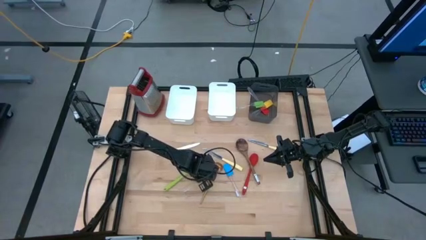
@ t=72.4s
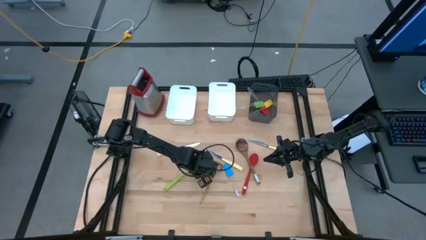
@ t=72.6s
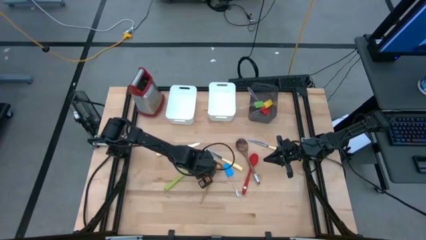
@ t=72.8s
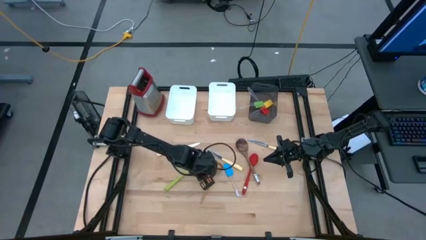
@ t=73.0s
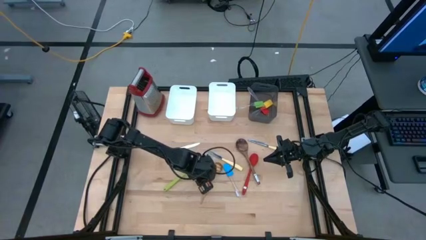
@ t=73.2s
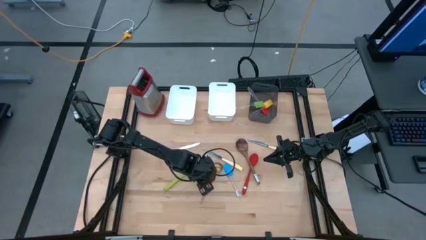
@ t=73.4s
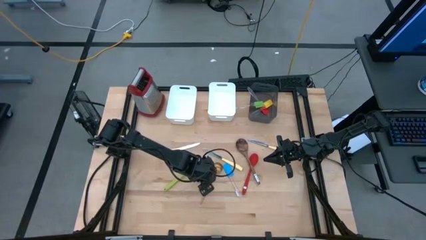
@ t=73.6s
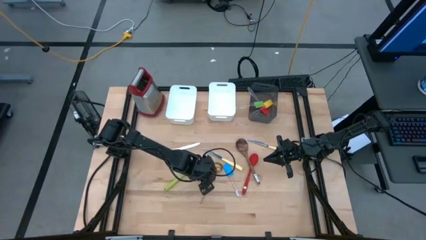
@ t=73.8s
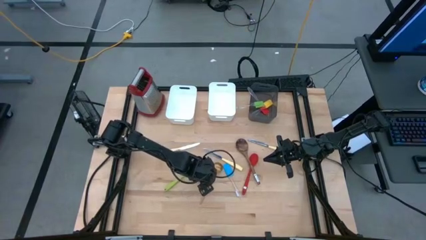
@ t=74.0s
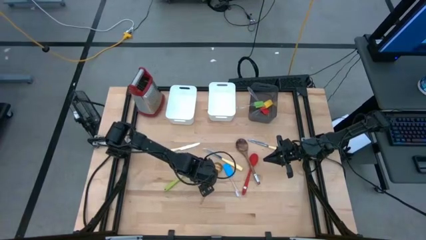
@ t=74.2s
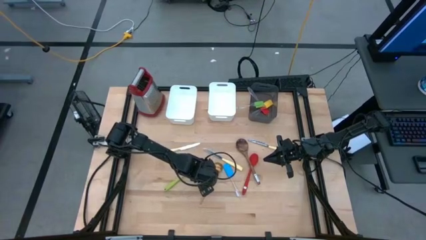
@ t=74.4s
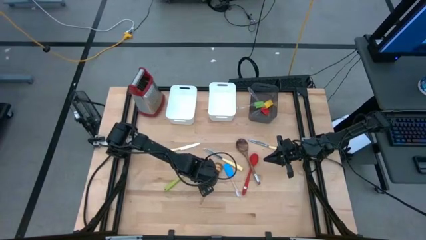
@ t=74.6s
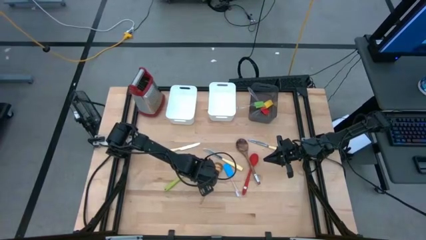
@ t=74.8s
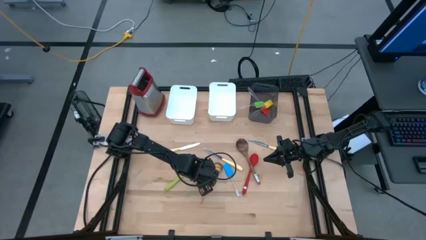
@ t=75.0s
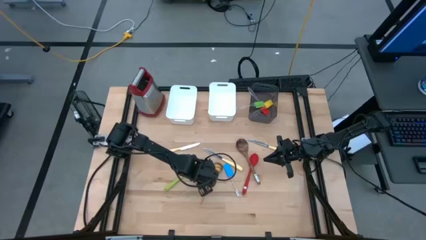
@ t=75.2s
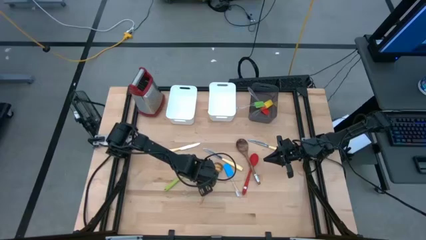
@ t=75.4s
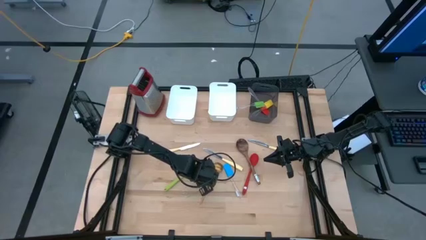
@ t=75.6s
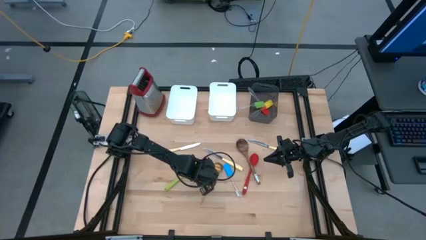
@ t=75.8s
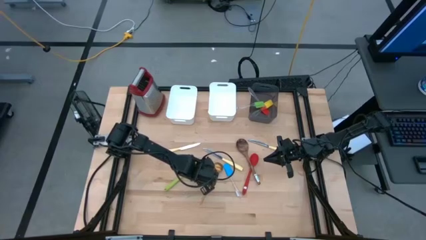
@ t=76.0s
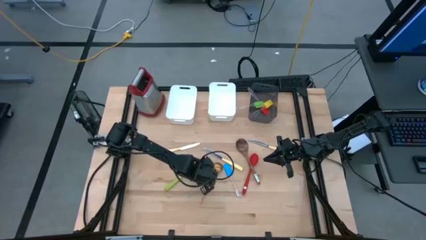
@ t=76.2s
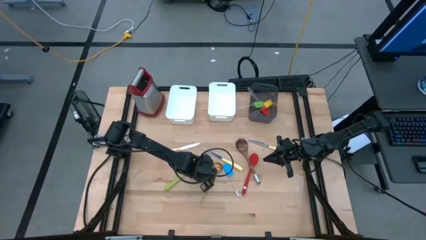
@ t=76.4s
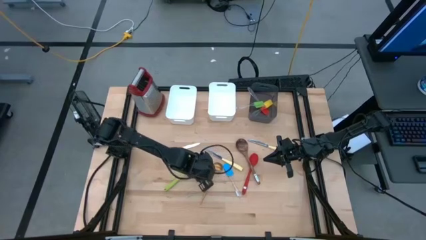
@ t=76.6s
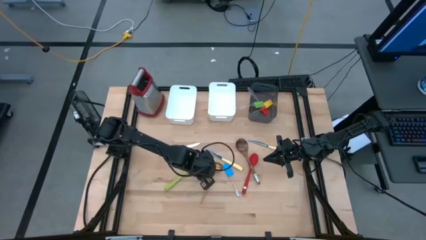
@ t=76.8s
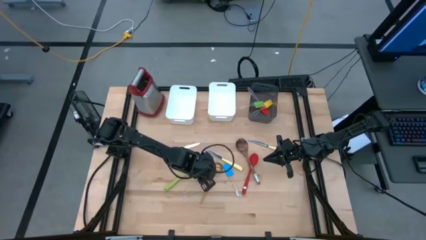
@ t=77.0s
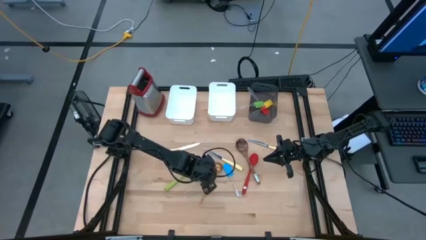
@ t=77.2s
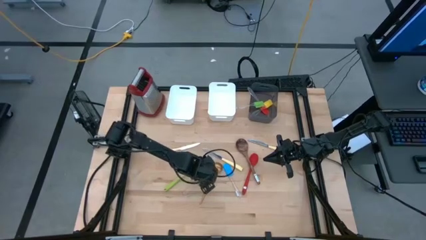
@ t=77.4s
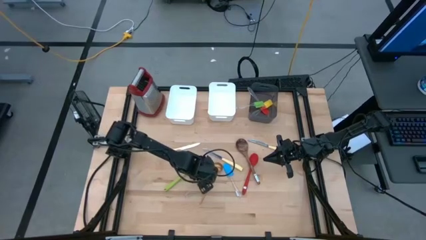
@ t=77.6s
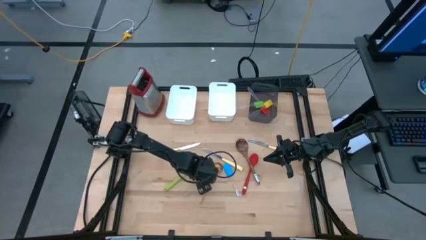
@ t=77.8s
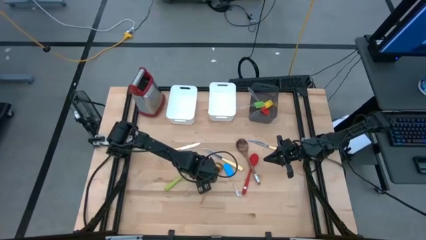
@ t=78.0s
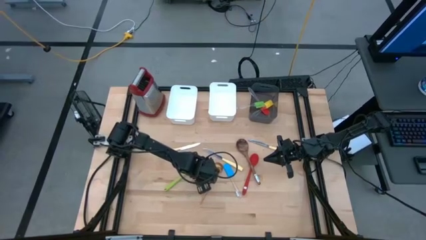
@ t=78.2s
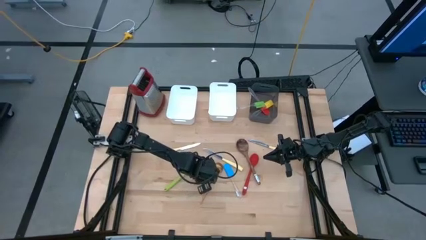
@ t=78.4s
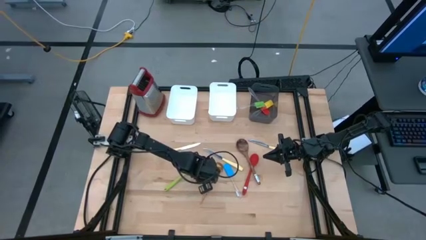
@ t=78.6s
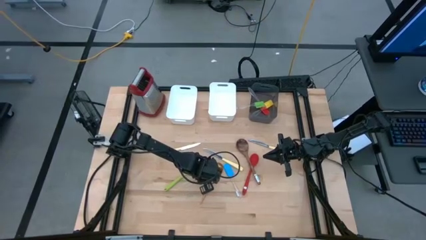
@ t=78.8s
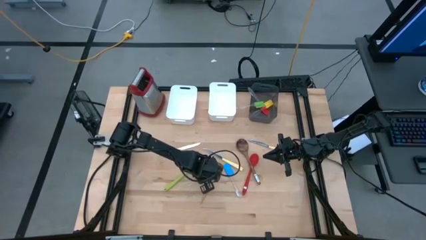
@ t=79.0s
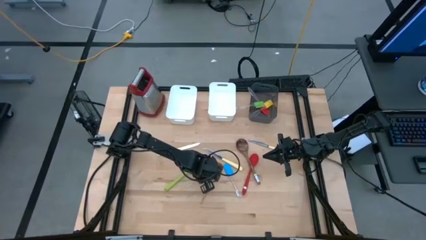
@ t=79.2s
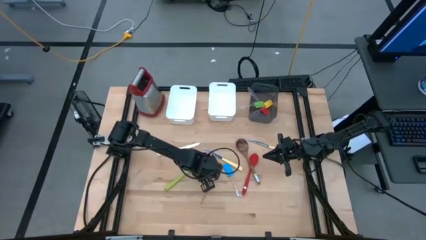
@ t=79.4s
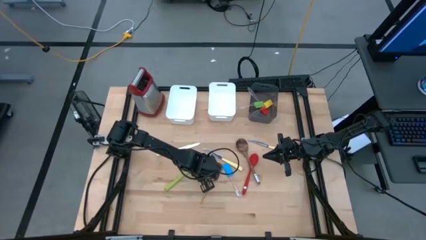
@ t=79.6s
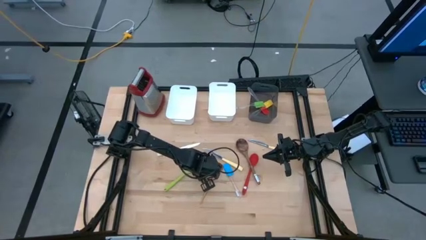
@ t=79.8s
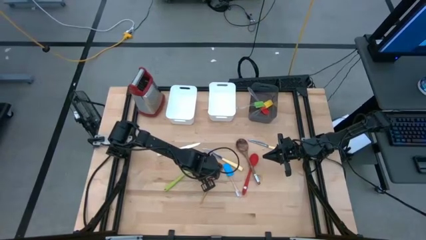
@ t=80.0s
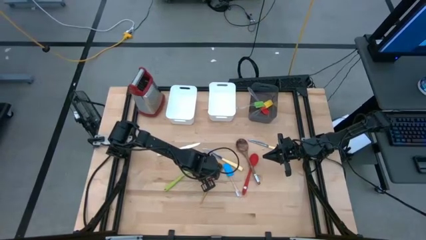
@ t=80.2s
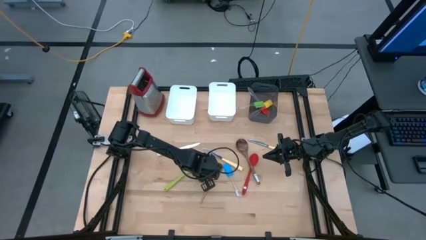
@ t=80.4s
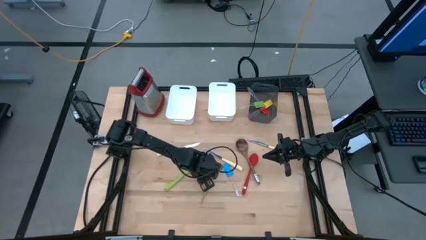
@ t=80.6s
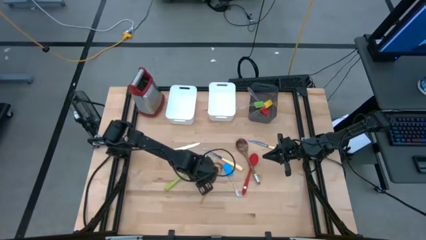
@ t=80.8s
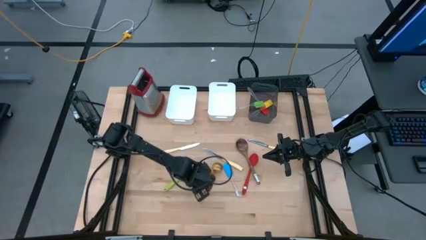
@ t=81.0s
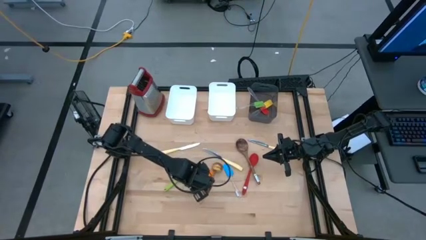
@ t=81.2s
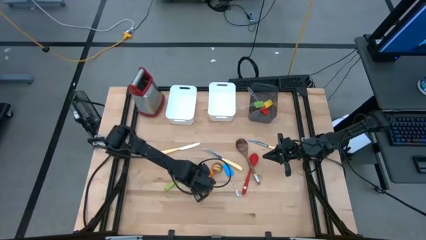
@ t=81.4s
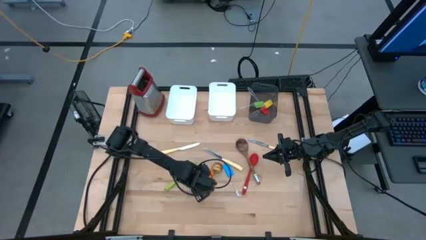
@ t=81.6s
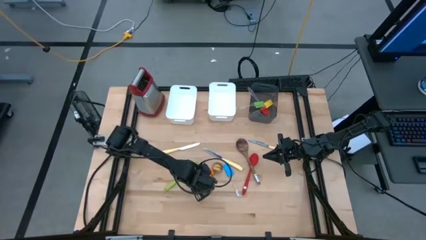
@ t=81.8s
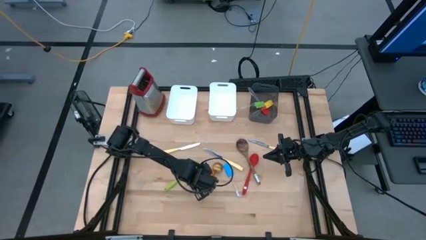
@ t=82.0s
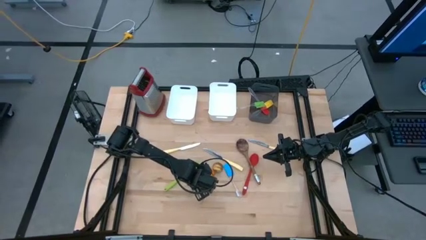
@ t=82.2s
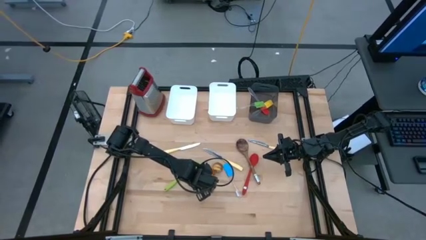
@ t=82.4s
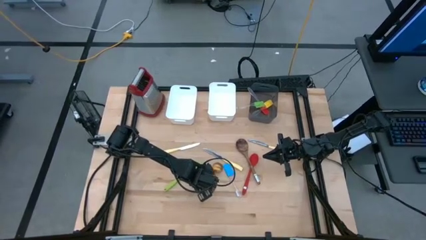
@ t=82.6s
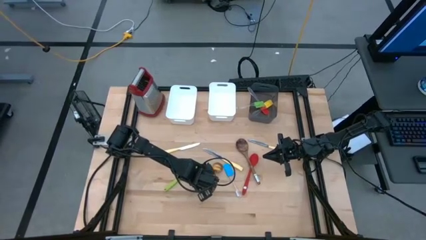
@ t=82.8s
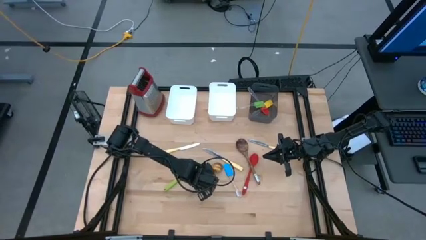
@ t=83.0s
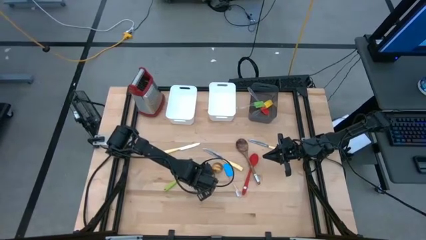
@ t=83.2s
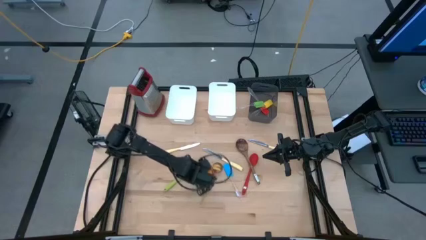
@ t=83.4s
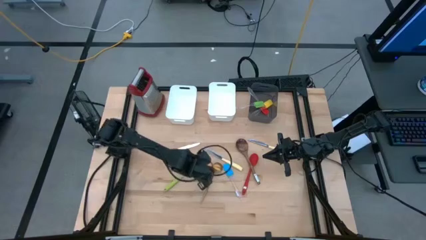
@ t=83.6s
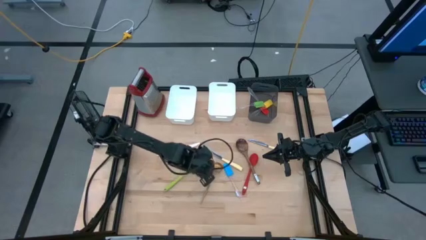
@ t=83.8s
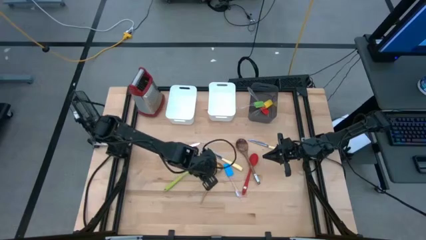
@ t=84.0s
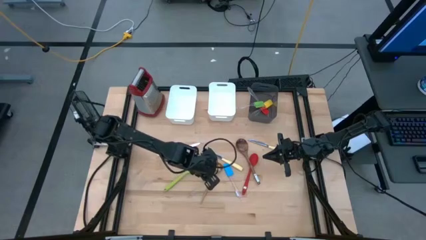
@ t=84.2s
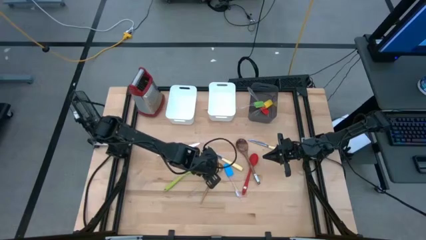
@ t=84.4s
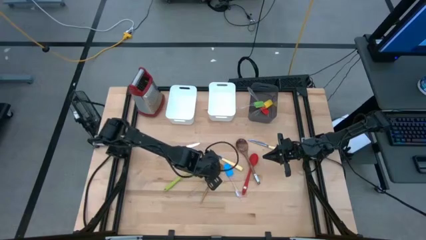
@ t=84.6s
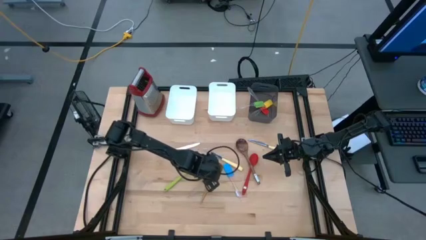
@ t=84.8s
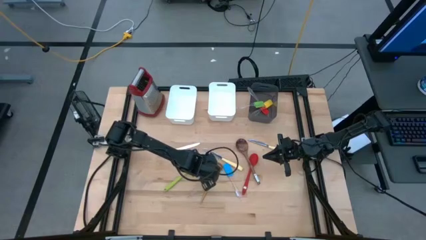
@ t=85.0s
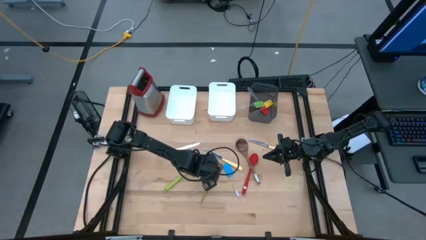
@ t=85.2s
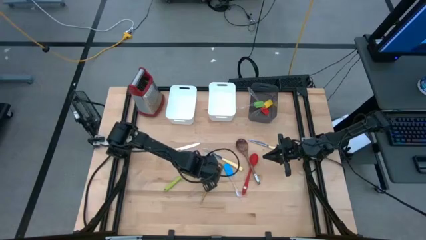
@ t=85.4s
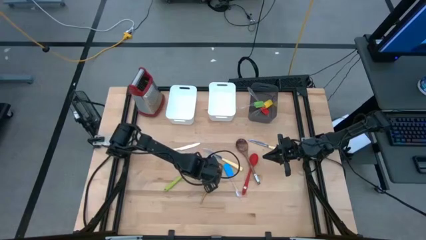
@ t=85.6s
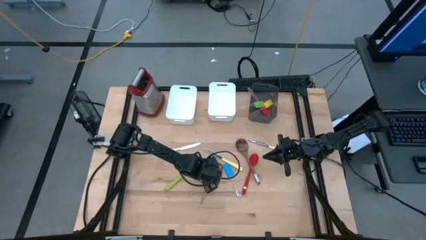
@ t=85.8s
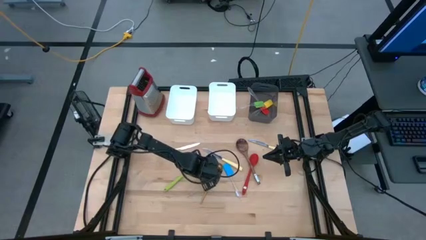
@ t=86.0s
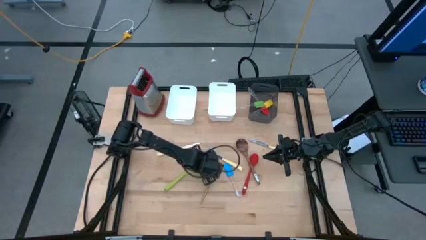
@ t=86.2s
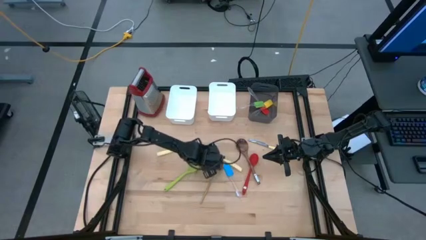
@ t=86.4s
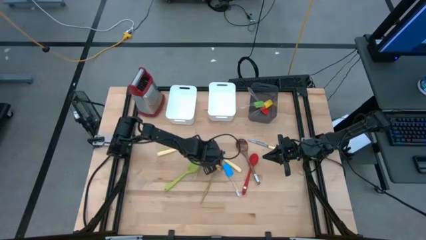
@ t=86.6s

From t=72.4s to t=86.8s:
Task: Pick & Place Kitchen Items
Put the orange spatula into the black bin
